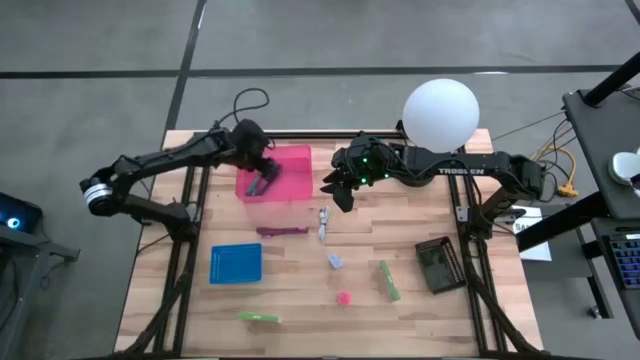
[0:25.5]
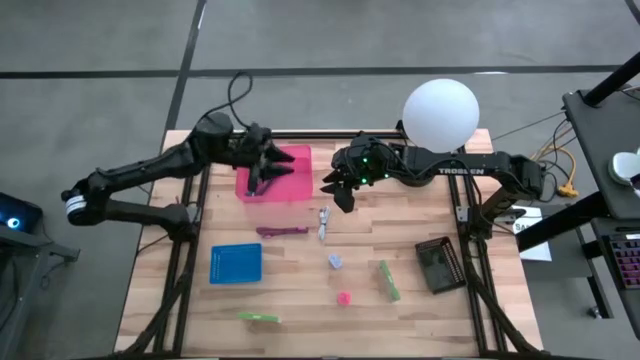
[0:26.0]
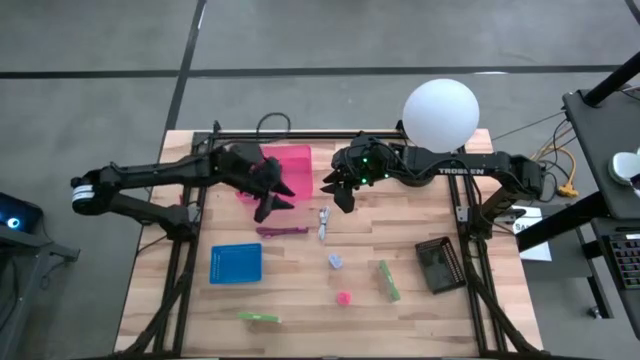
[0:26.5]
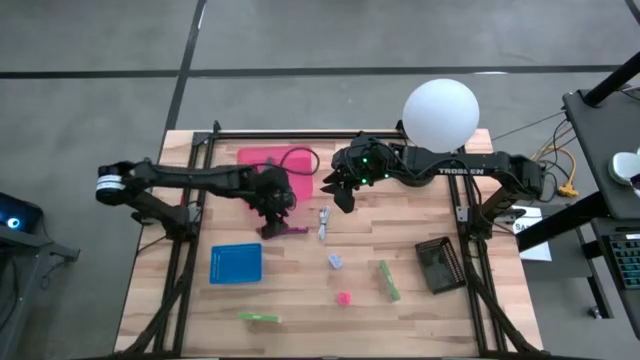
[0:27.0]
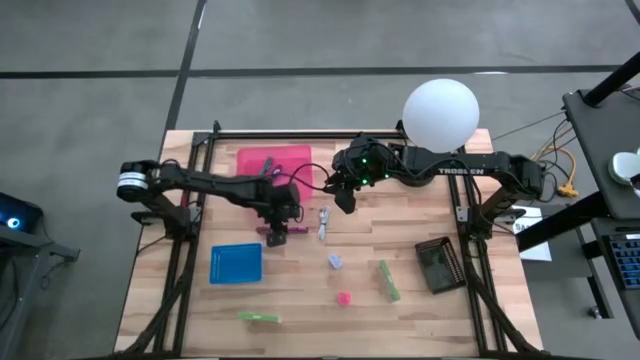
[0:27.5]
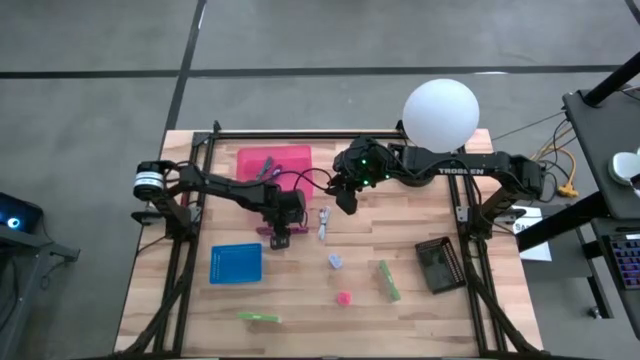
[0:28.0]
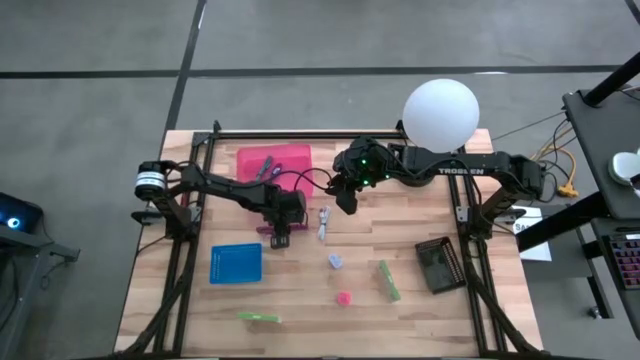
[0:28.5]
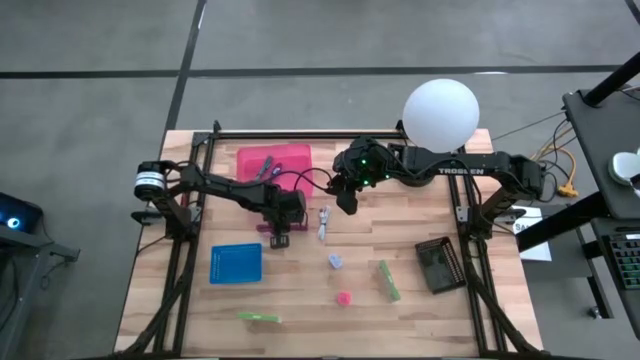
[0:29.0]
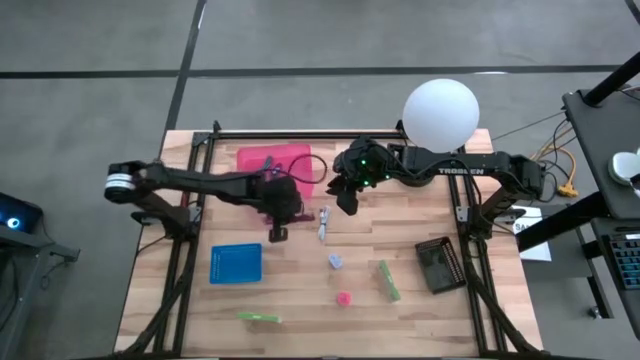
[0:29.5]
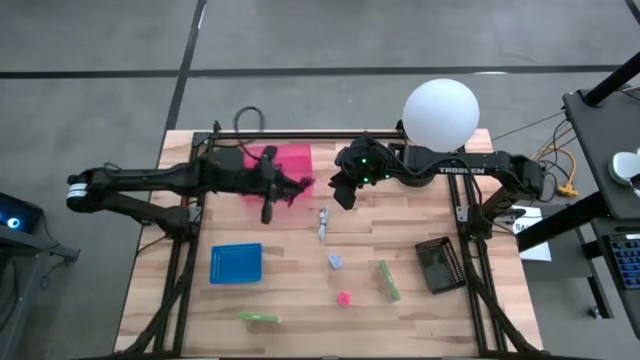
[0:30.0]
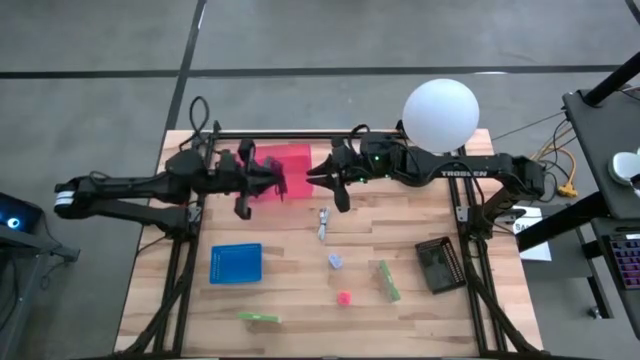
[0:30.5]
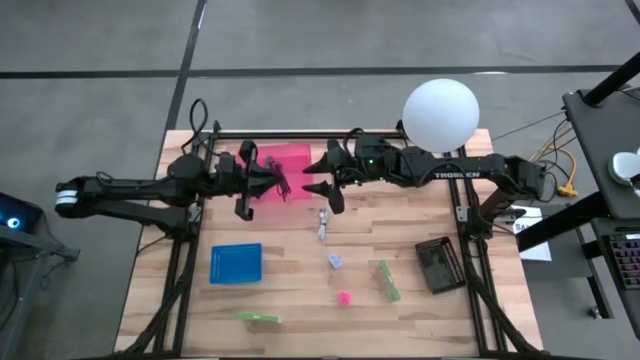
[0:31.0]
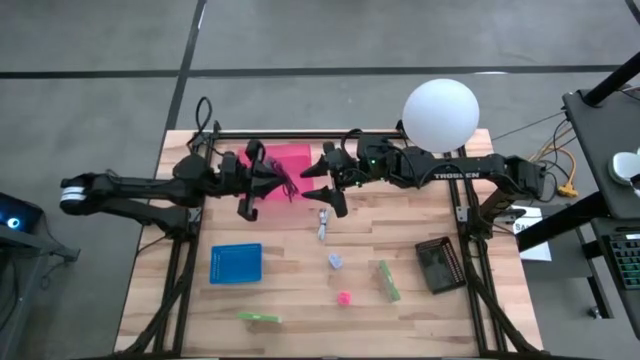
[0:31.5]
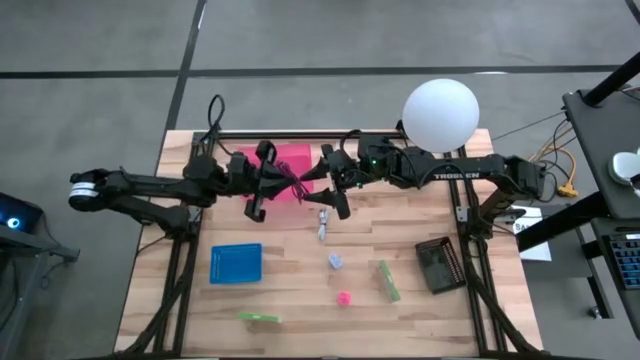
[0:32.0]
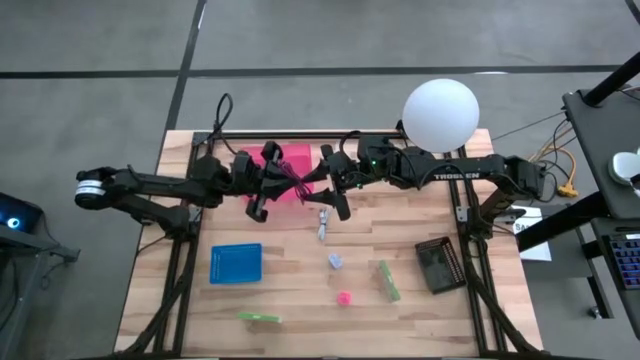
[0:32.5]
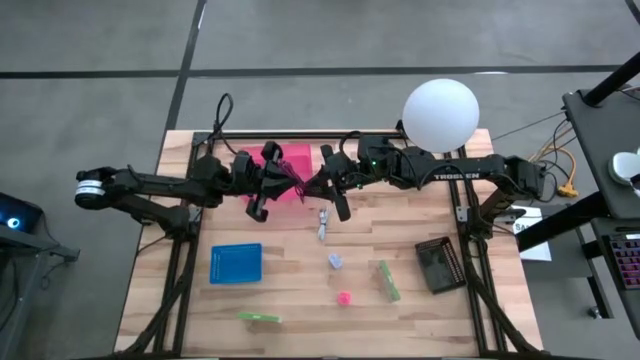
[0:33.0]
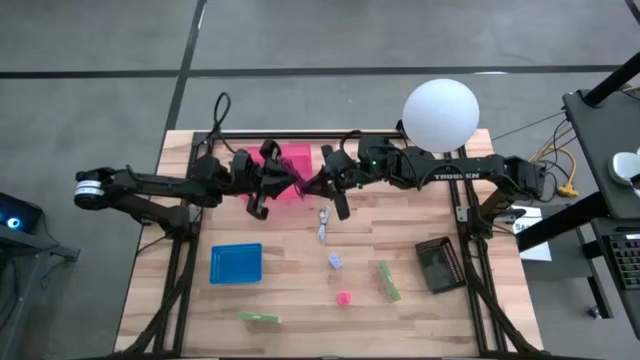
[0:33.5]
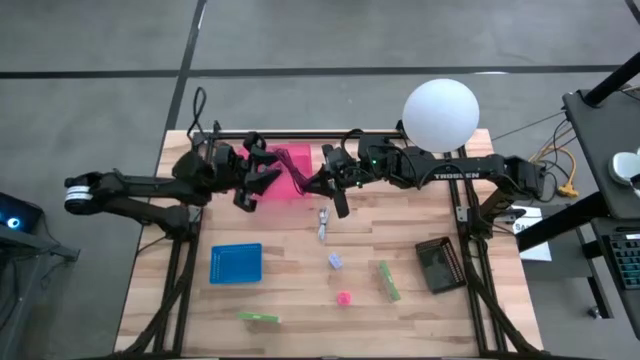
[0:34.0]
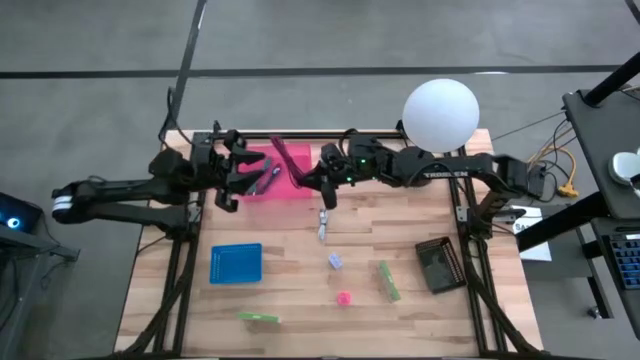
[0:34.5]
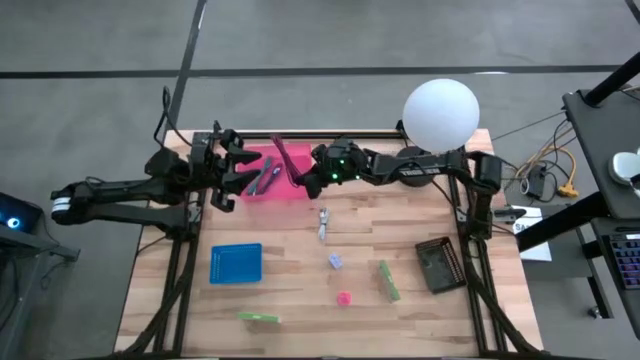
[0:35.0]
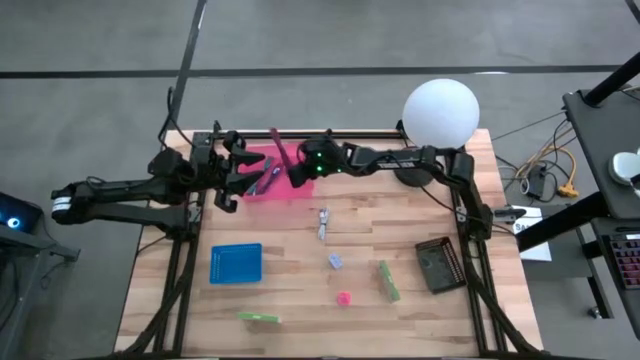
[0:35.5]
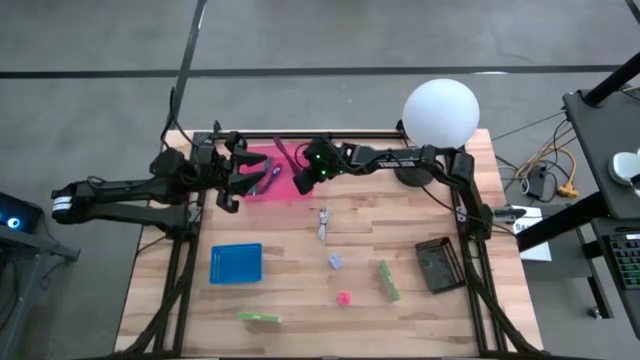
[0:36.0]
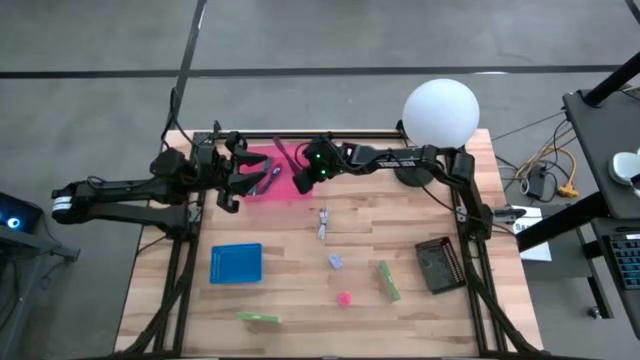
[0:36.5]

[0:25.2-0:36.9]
Task: Pick and place items into bin
Put the pink charger cable into the pink bin

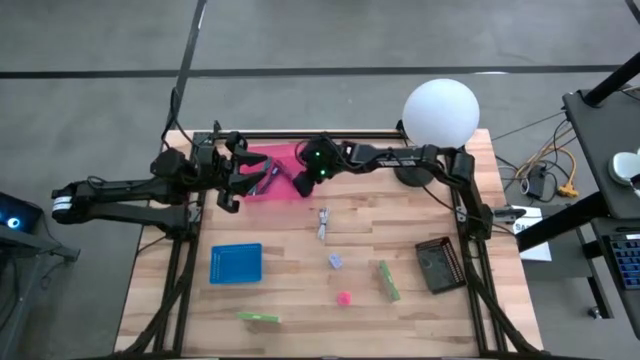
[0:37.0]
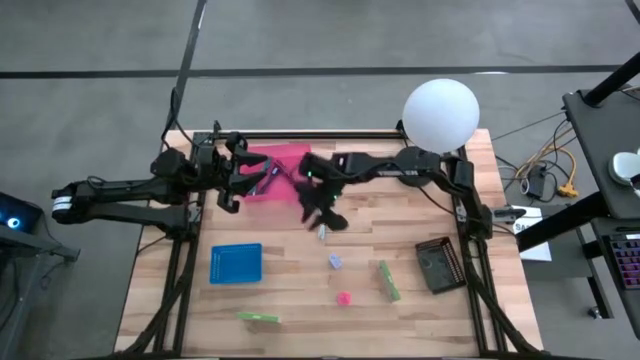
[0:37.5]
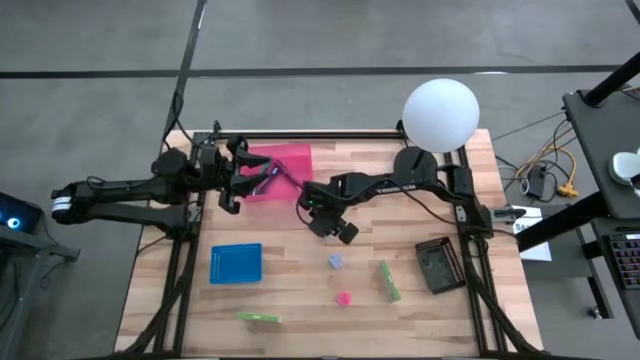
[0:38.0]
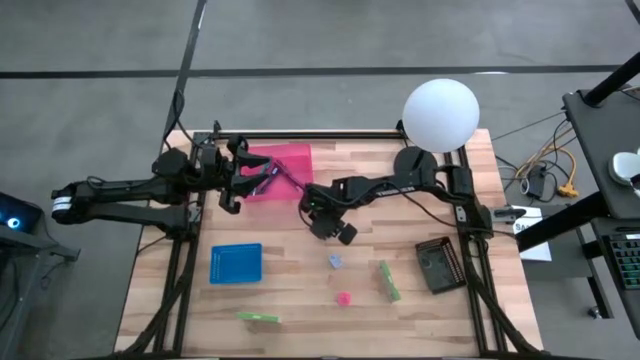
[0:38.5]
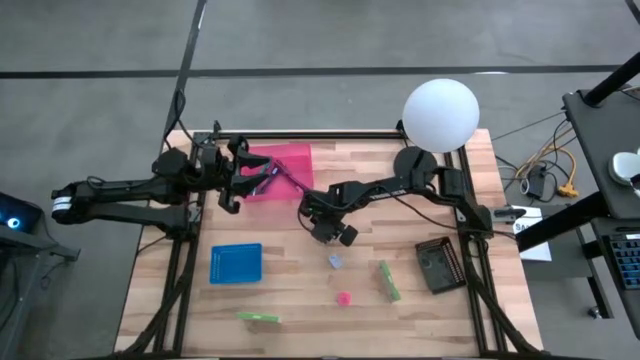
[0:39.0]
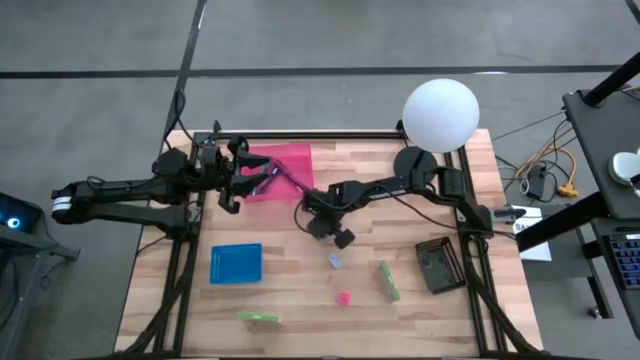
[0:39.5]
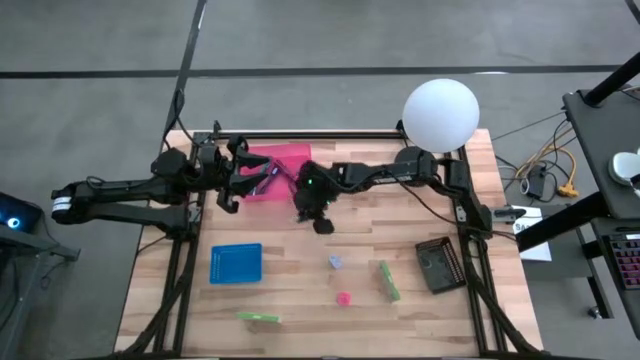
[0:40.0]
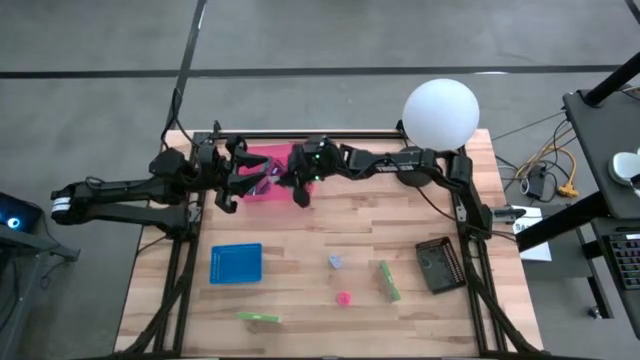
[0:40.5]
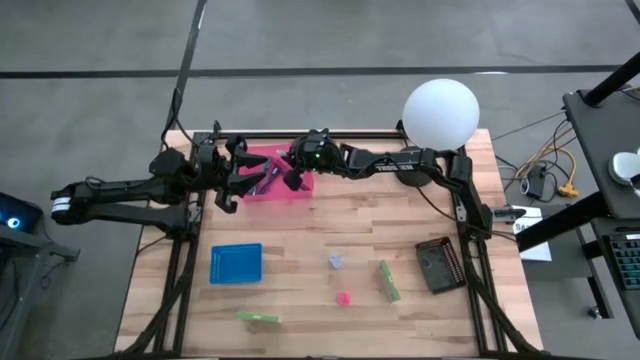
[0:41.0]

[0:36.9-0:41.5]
Put the white charger cable into the pink bin

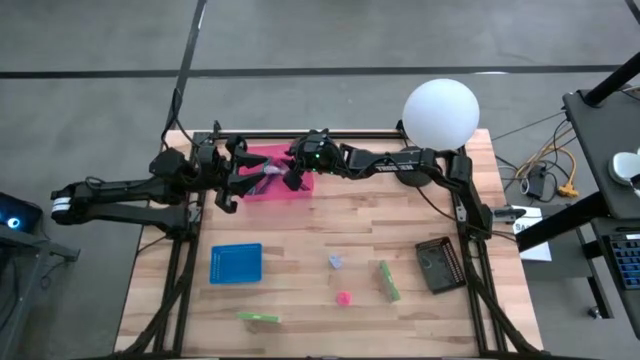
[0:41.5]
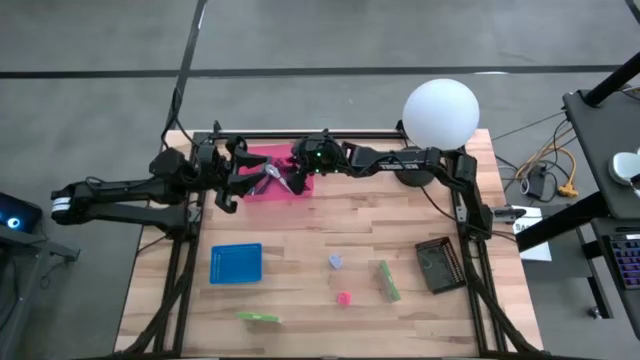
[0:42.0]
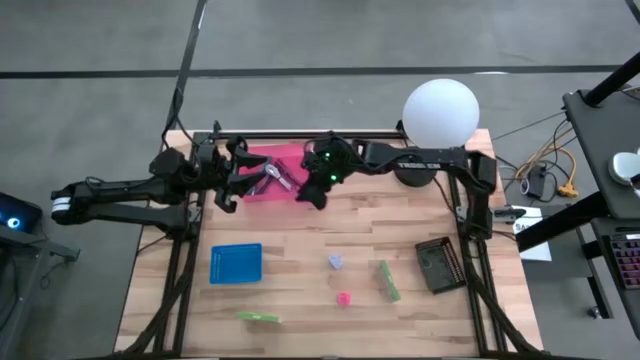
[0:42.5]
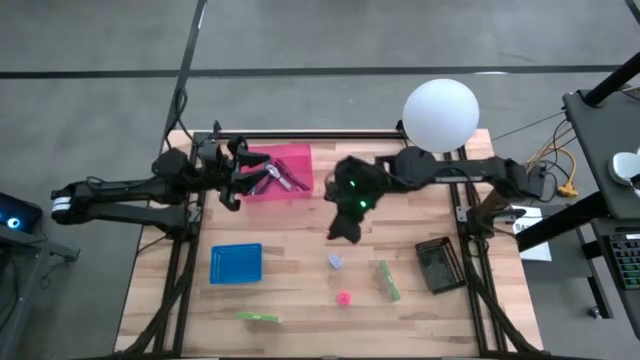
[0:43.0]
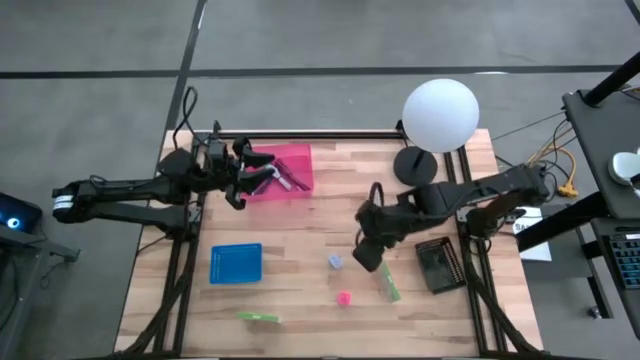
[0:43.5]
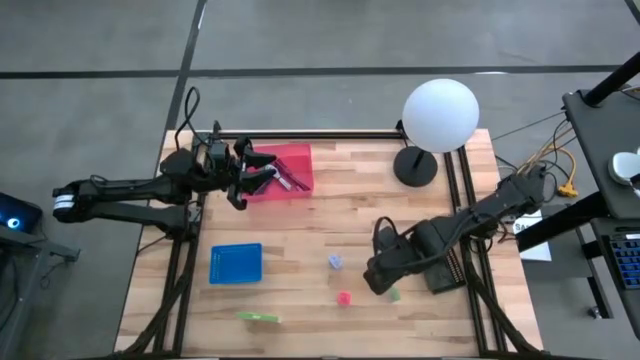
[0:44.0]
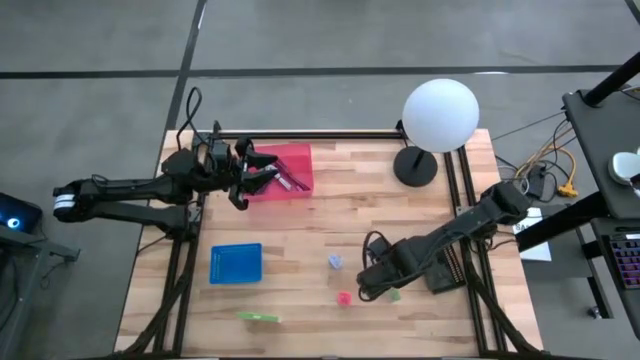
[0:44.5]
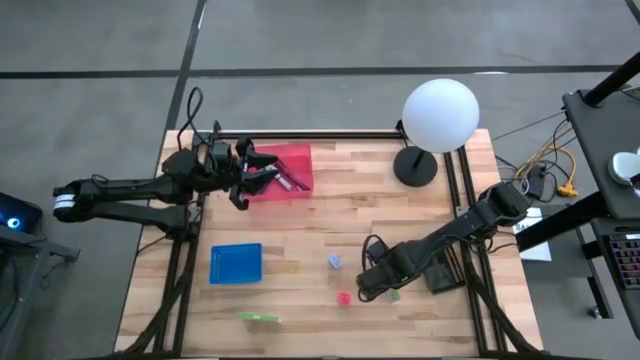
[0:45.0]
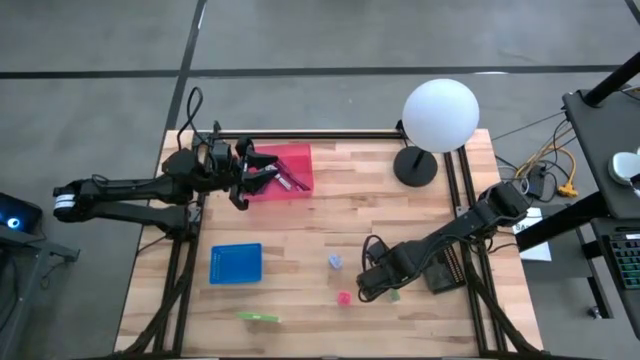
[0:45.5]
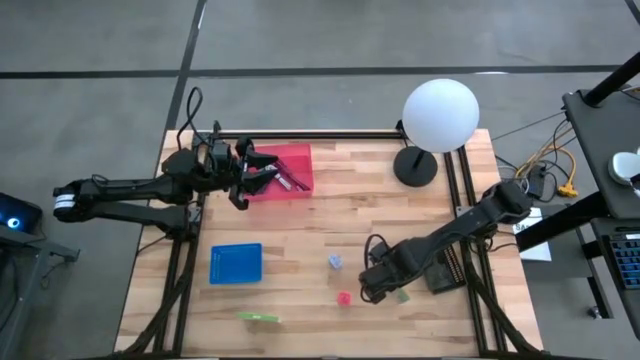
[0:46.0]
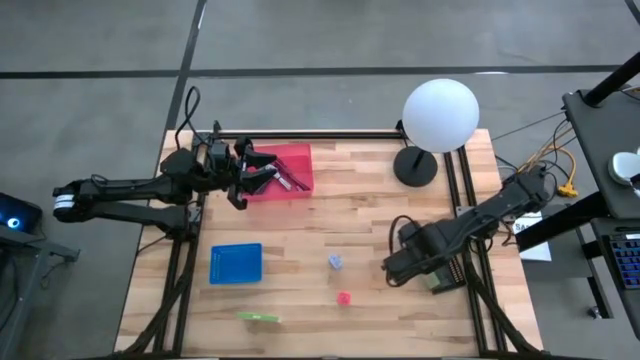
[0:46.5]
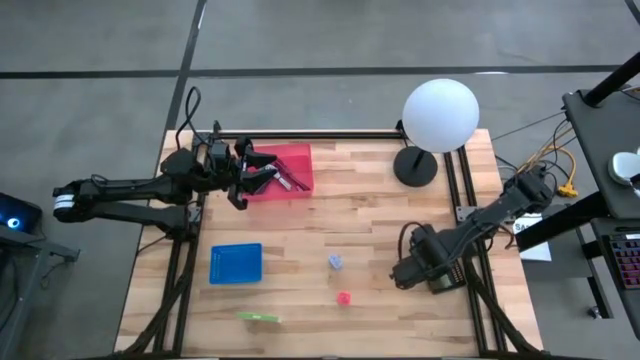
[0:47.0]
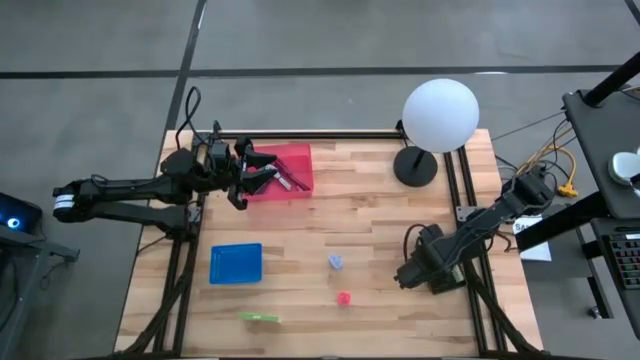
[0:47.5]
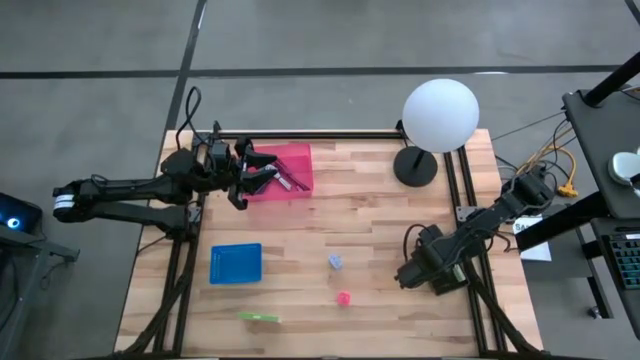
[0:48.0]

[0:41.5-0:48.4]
Put the card reader box into the black bin
